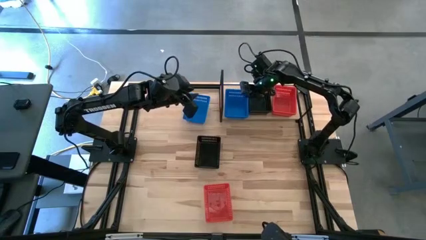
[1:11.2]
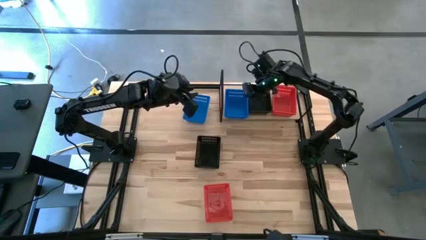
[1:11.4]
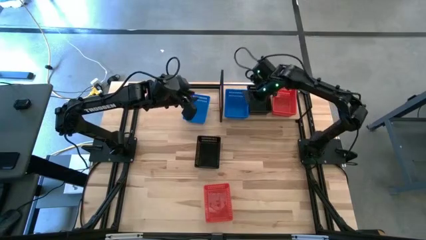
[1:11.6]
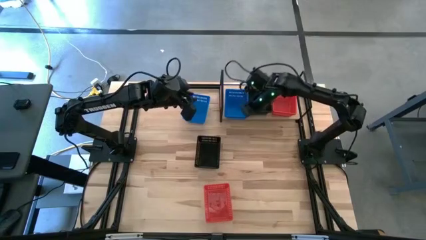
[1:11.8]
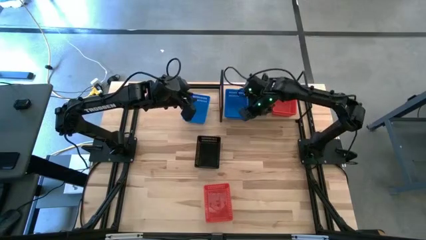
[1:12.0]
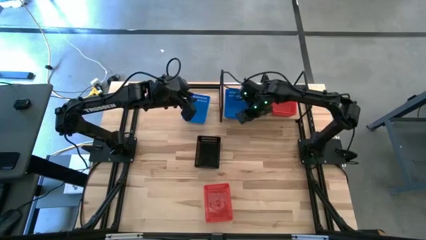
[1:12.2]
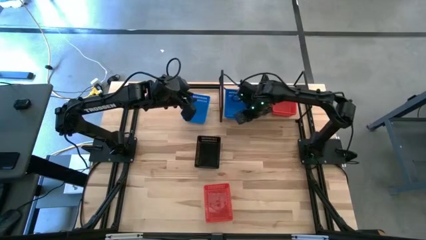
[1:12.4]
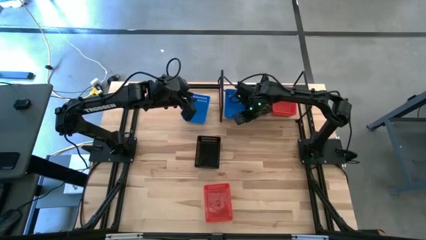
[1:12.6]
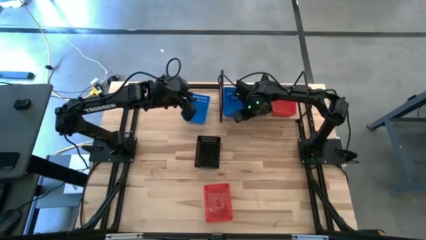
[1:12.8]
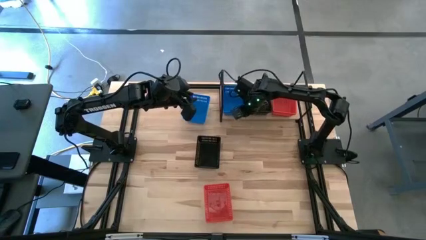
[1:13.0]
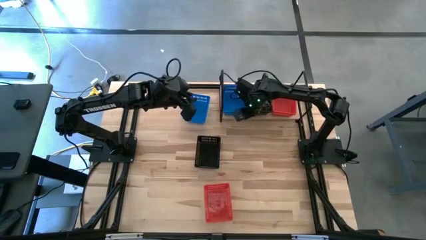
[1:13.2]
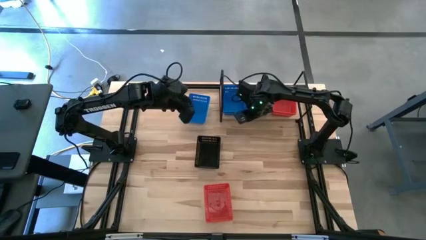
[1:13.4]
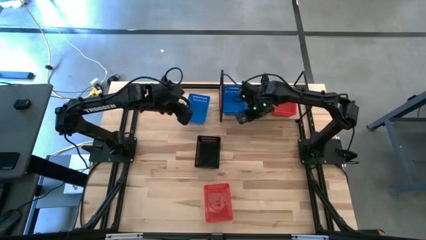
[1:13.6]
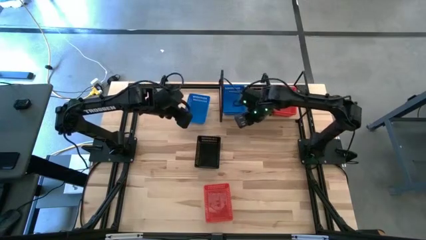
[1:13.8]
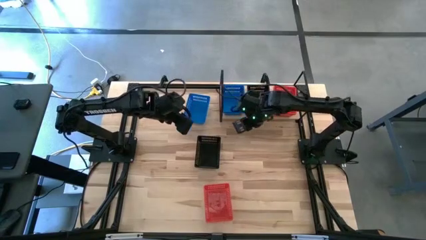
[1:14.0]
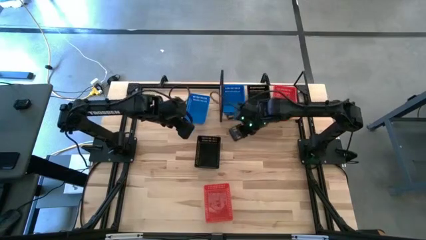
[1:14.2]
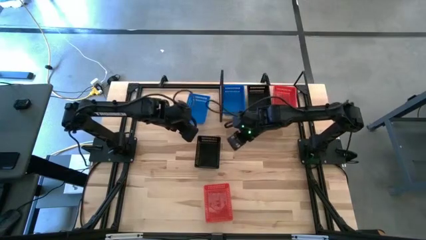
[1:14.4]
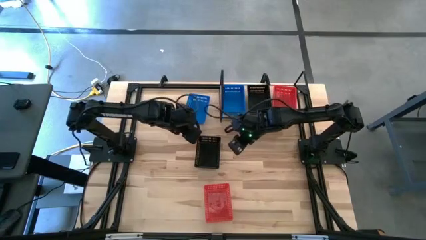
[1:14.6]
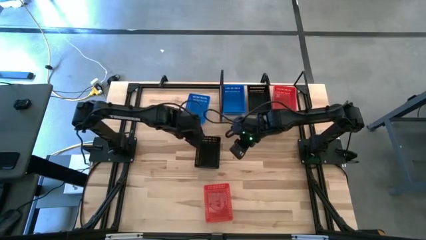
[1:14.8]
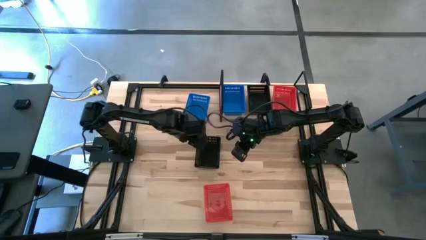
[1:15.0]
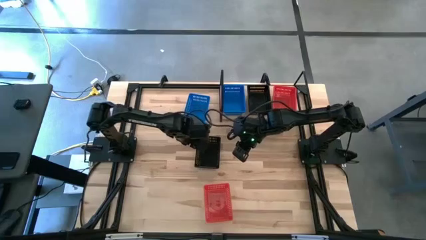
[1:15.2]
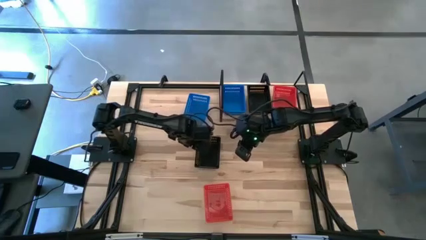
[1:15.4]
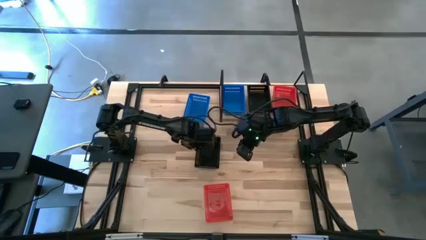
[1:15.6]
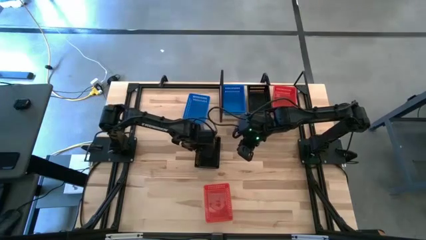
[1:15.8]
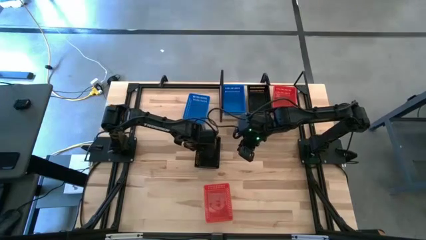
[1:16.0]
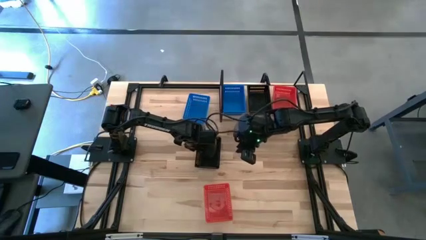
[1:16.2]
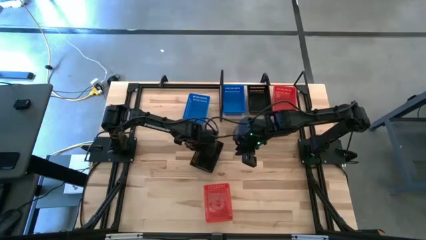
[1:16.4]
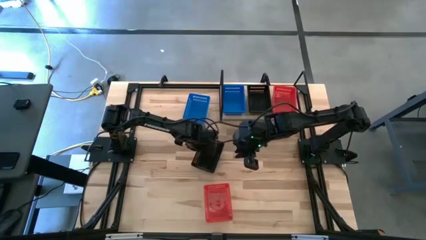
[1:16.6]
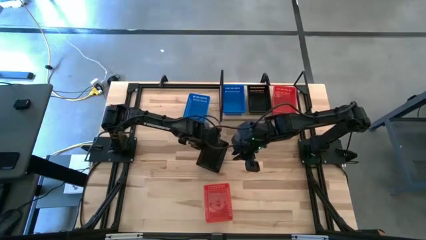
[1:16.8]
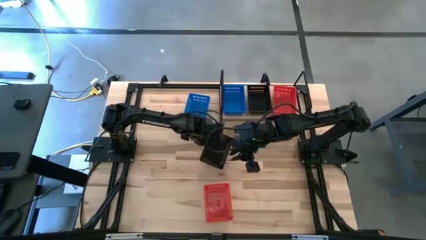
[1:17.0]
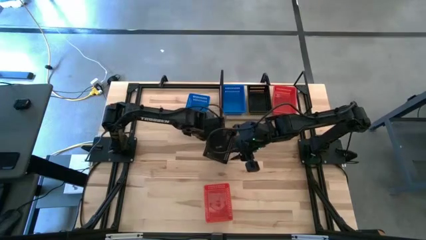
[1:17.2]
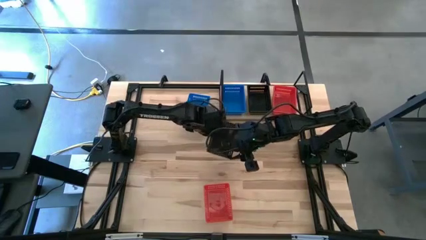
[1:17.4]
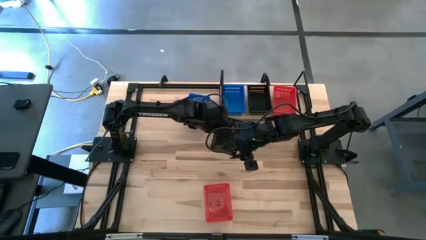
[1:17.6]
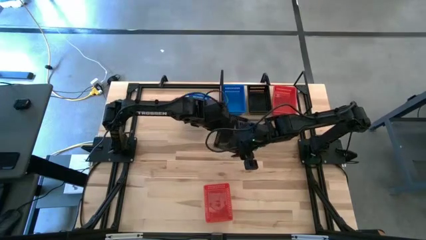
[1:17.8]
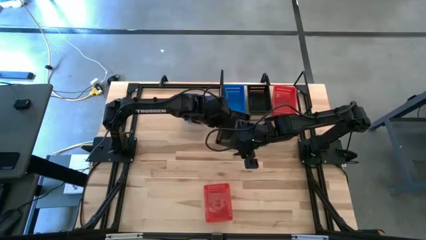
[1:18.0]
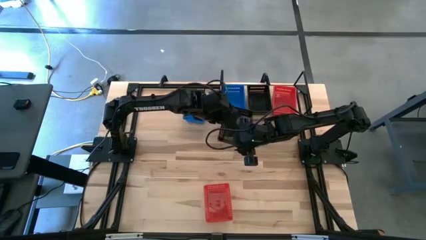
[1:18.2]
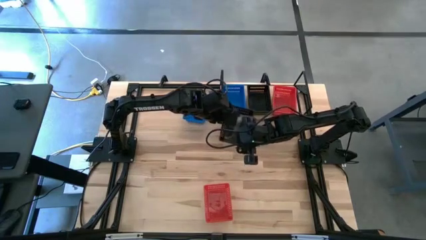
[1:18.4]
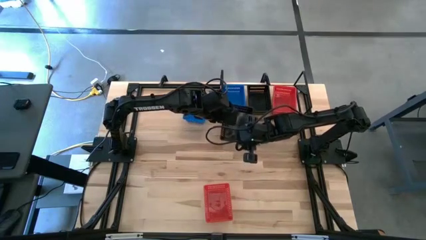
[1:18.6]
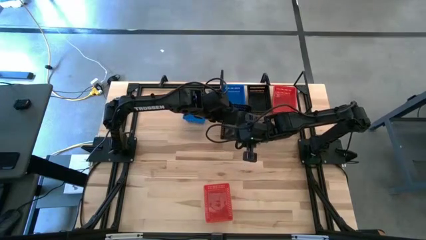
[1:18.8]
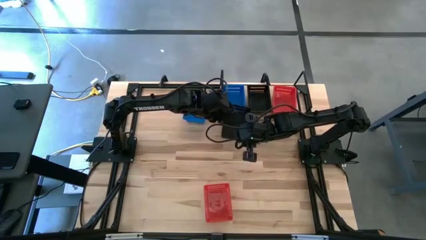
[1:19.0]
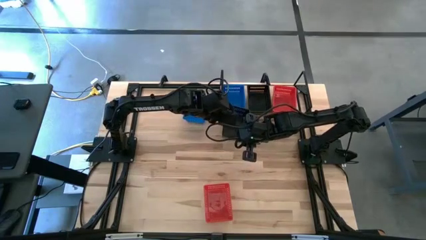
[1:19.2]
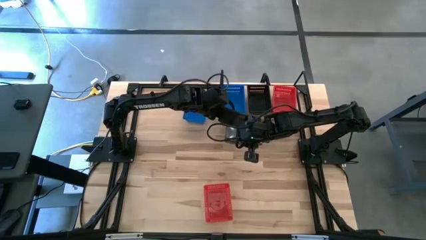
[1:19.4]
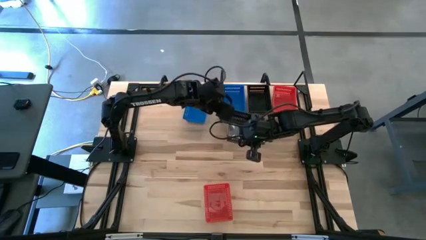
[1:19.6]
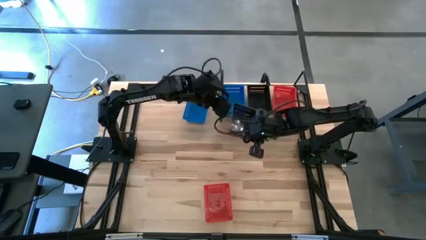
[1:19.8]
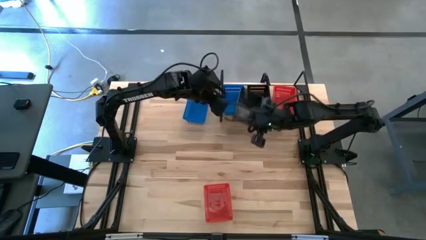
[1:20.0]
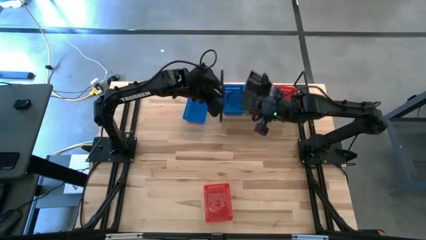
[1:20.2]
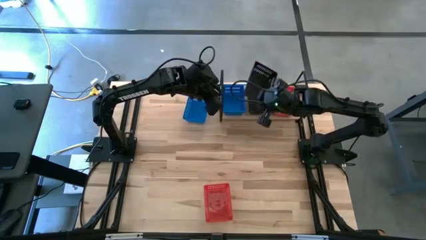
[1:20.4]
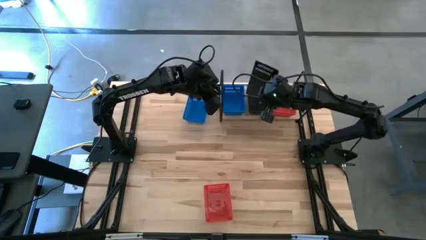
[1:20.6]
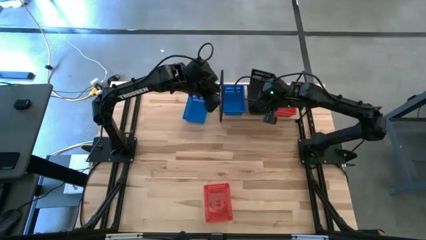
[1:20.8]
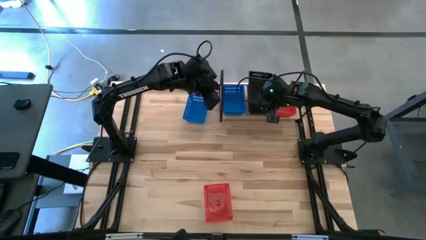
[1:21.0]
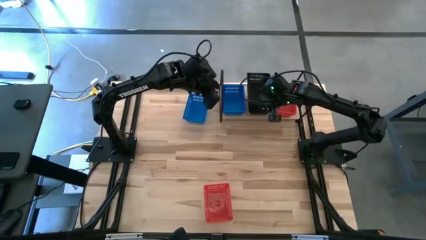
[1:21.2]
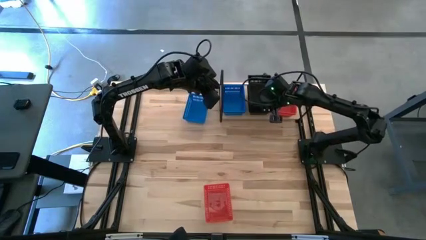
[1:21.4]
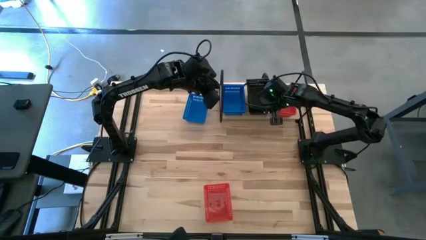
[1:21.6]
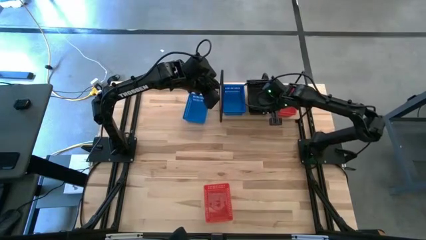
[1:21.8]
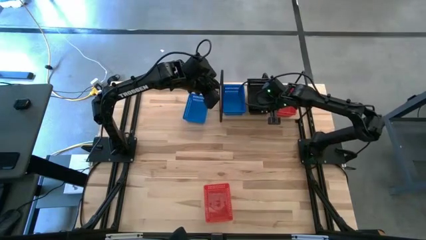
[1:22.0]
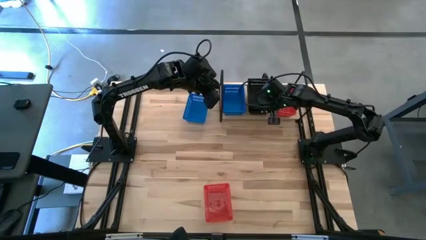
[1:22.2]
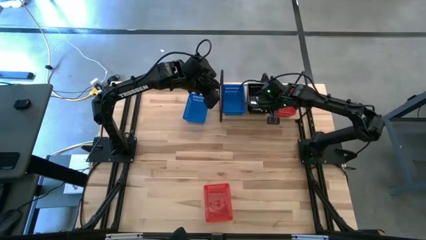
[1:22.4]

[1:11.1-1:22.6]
Task: Stack baskets on shelf by color
Stack the black bin on top of the other black bin on the shelf

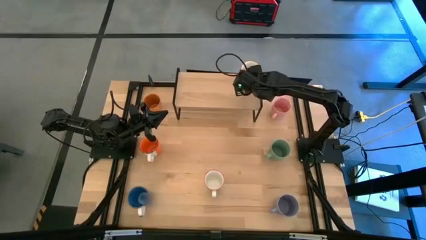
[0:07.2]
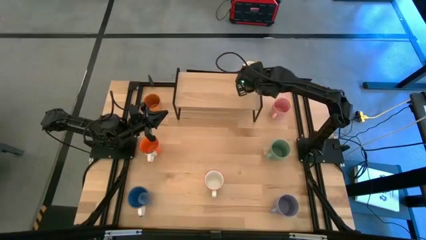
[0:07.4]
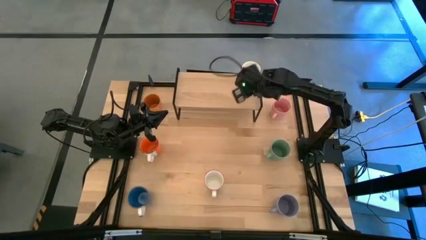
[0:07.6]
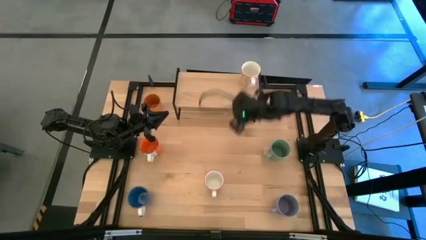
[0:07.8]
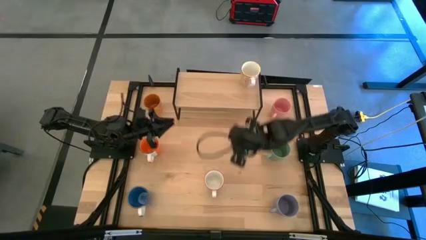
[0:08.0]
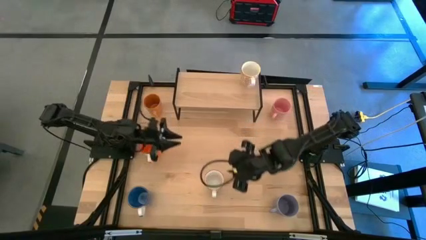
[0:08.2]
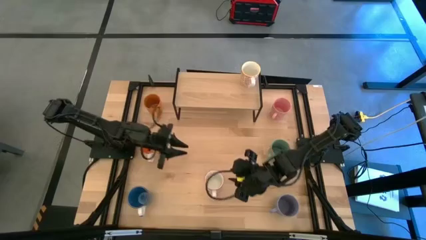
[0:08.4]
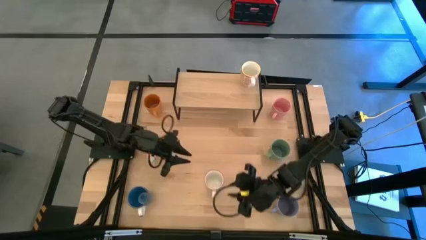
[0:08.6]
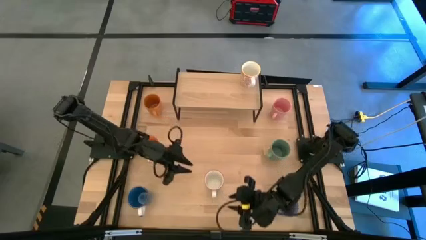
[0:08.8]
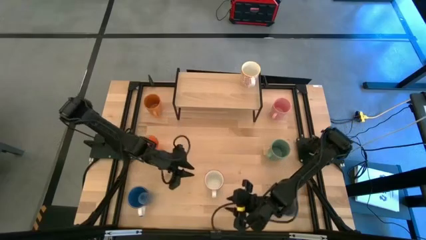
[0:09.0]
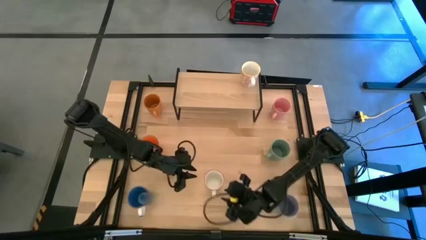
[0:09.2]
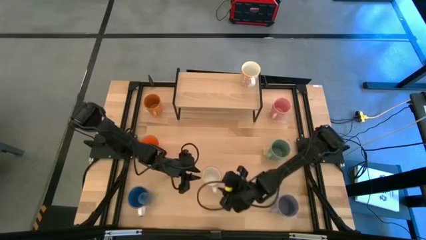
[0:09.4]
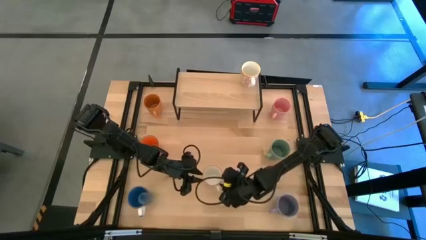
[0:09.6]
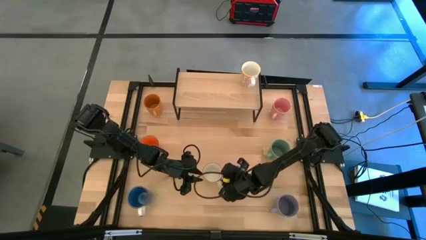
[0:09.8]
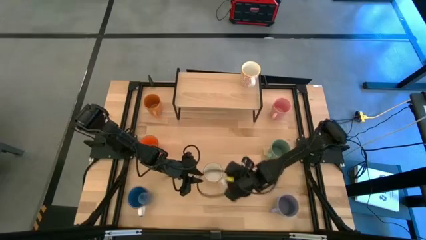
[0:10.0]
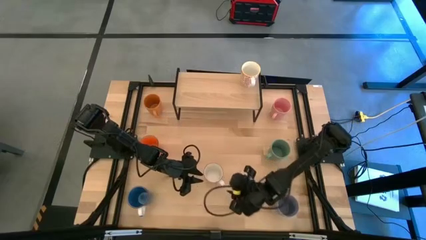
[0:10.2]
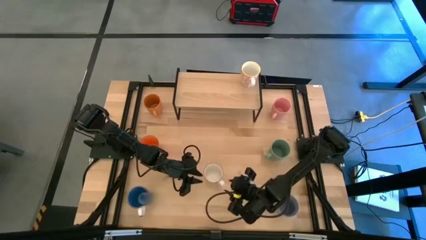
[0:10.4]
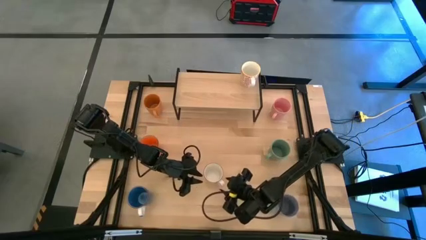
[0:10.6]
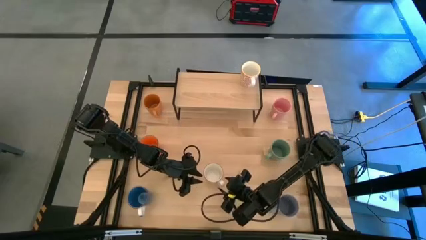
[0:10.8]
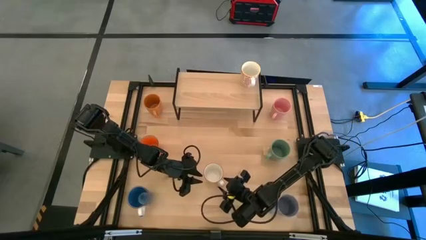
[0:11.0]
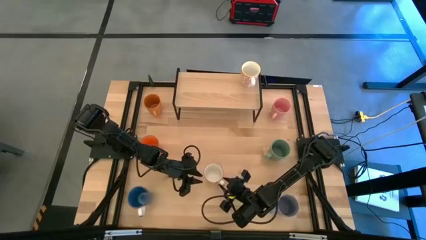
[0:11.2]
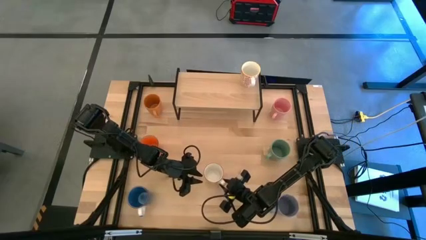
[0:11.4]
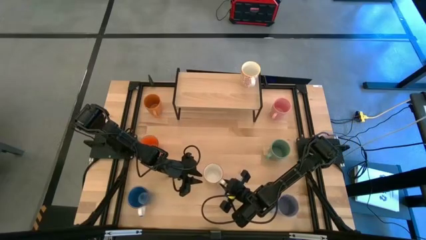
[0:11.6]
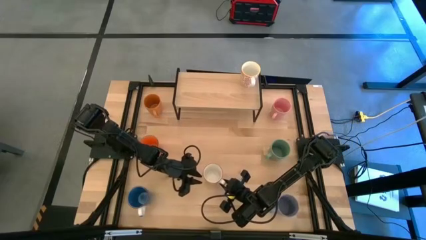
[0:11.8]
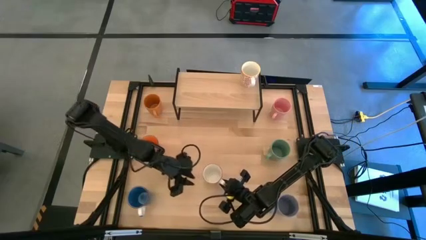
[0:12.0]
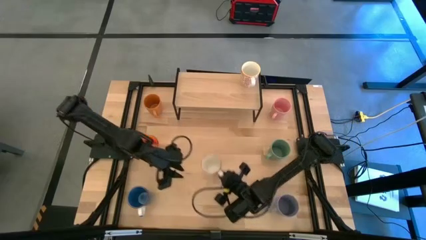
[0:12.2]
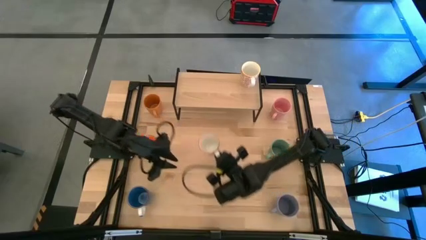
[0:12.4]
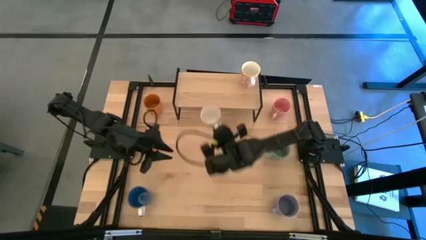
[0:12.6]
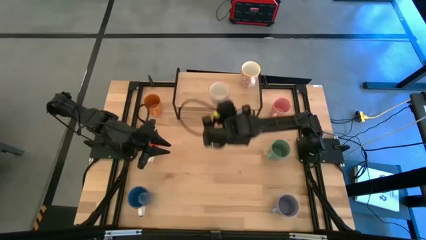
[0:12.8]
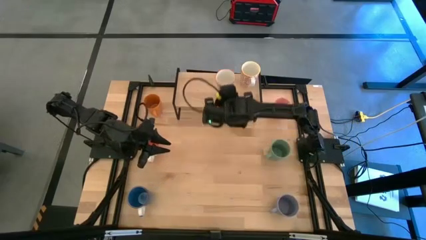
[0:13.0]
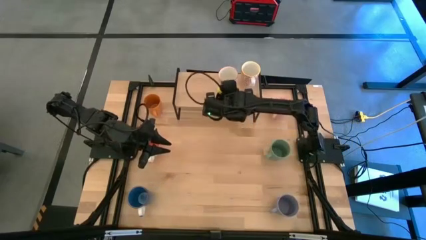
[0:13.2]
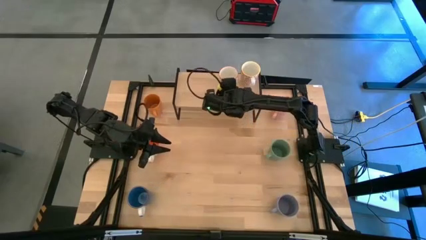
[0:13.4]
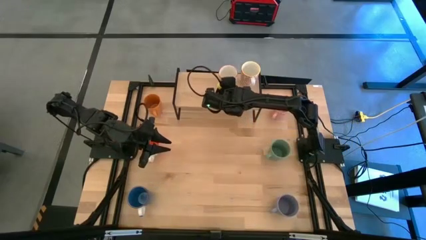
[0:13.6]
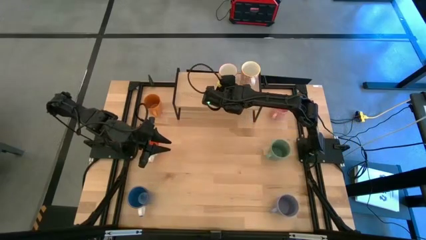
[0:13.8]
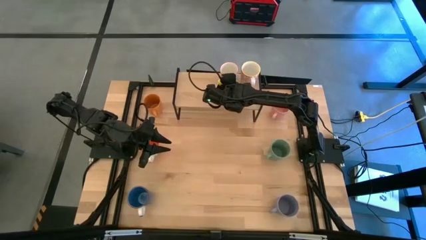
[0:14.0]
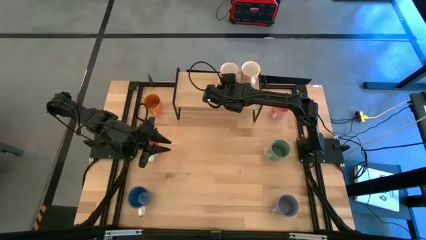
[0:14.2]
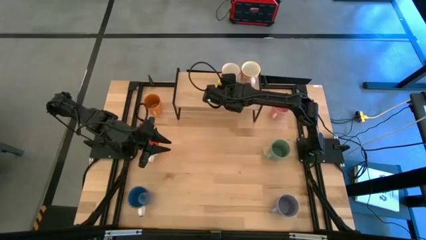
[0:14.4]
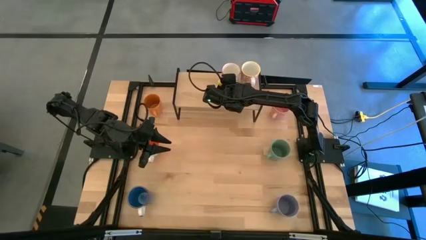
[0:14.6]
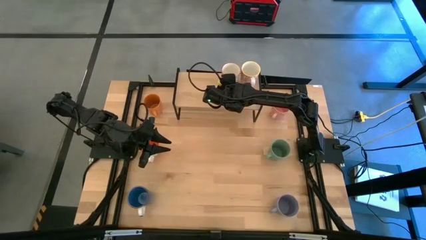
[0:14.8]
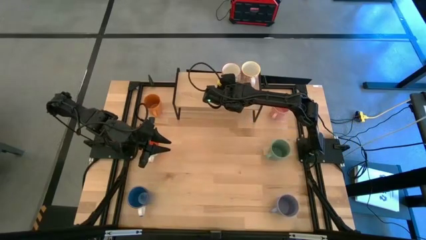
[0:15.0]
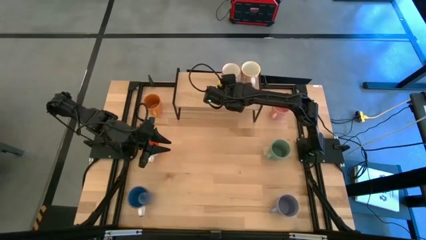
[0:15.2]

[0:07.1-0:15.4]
Task: Place coffee mugs
Put the gray patterned mug on the shelf
